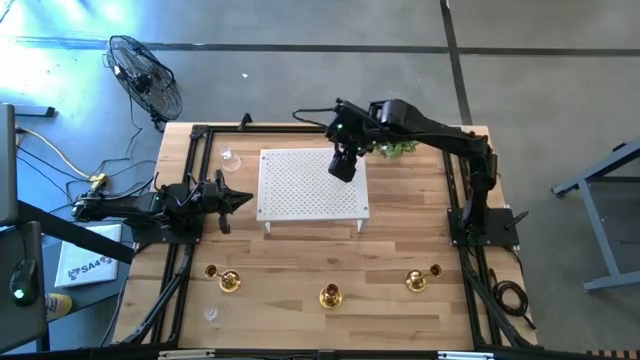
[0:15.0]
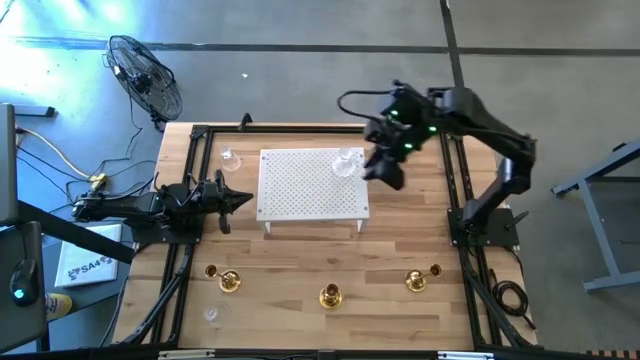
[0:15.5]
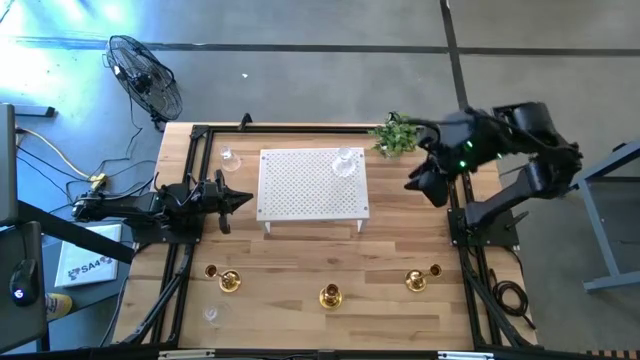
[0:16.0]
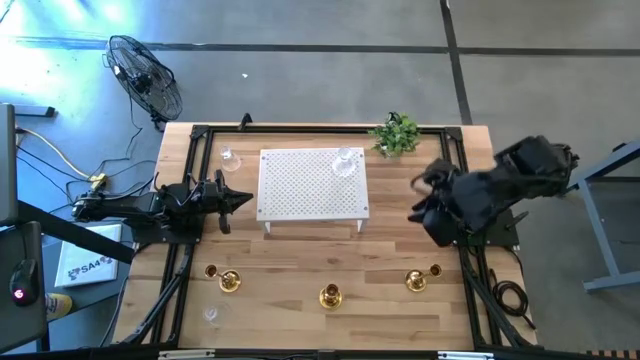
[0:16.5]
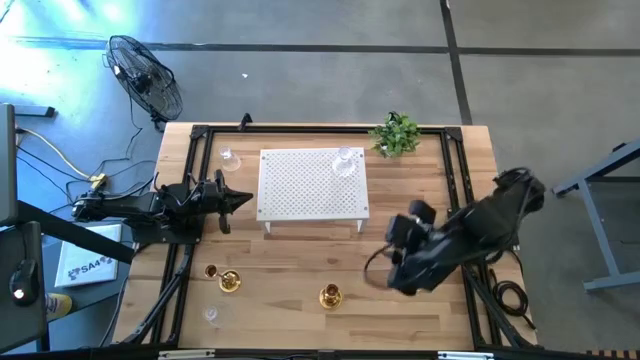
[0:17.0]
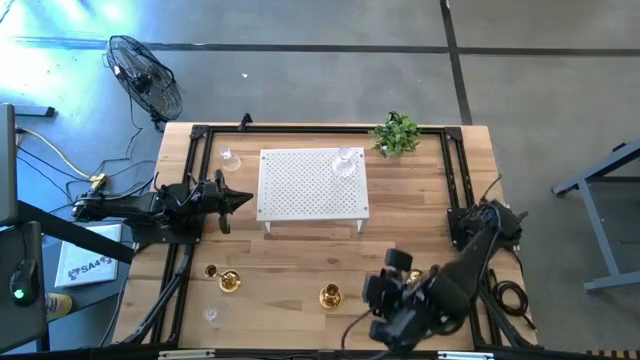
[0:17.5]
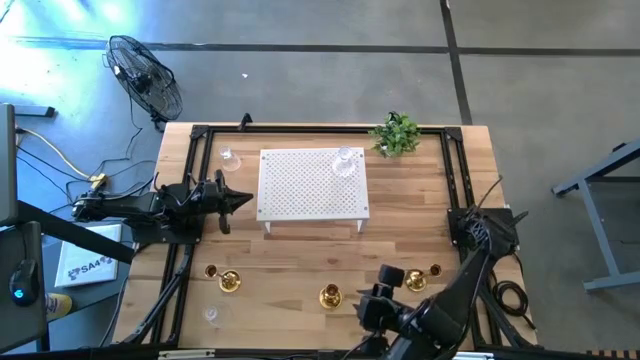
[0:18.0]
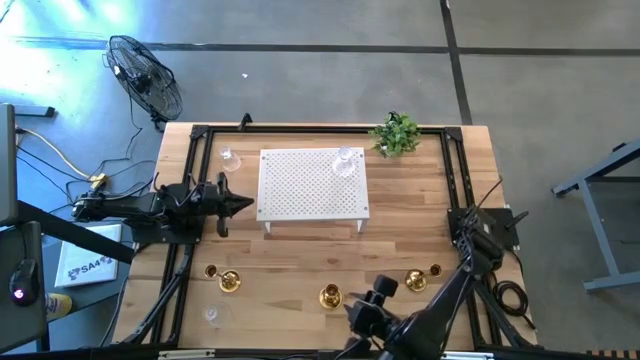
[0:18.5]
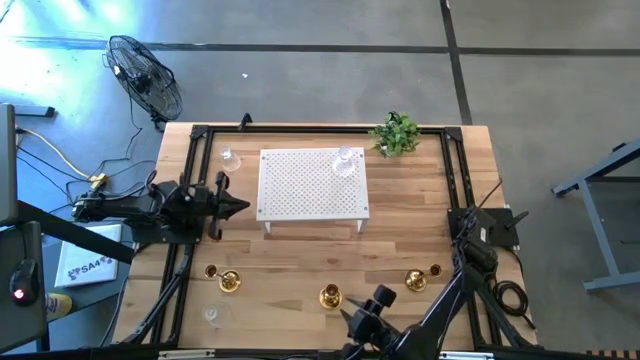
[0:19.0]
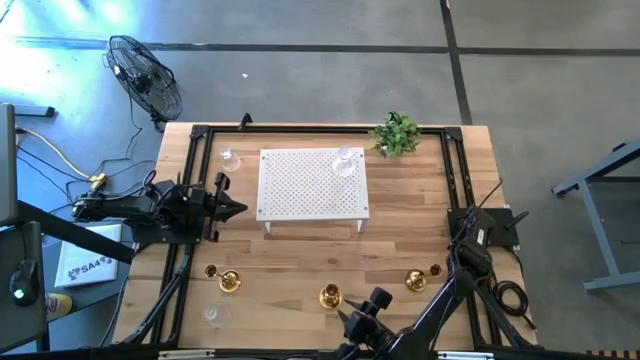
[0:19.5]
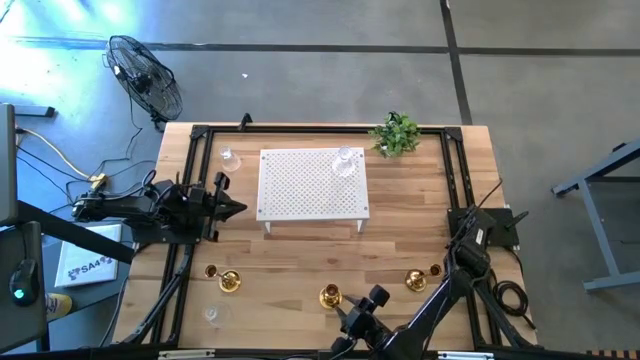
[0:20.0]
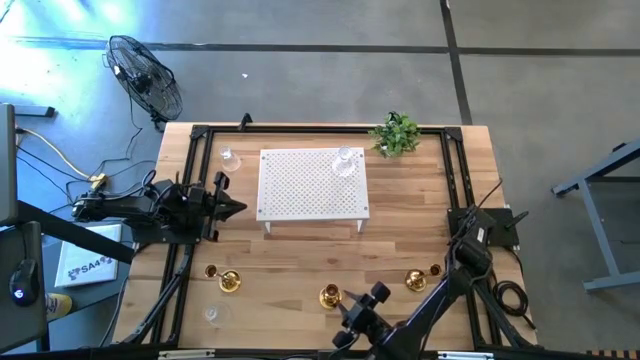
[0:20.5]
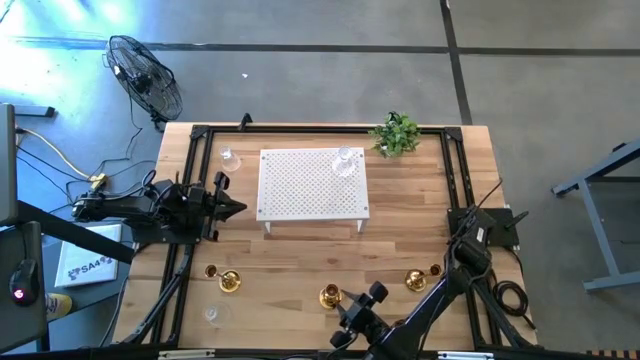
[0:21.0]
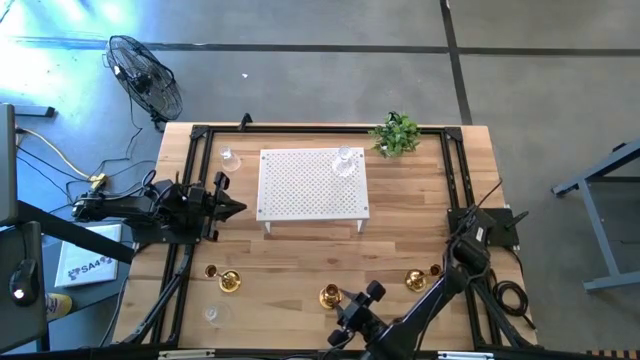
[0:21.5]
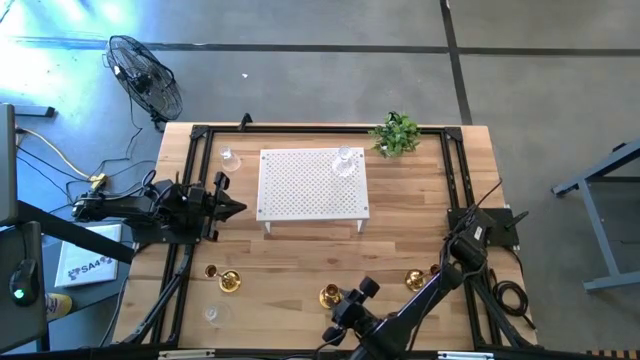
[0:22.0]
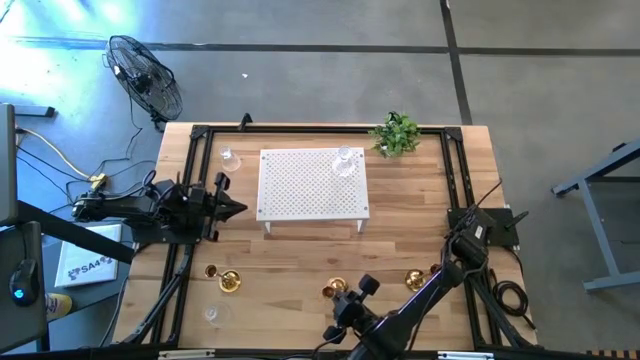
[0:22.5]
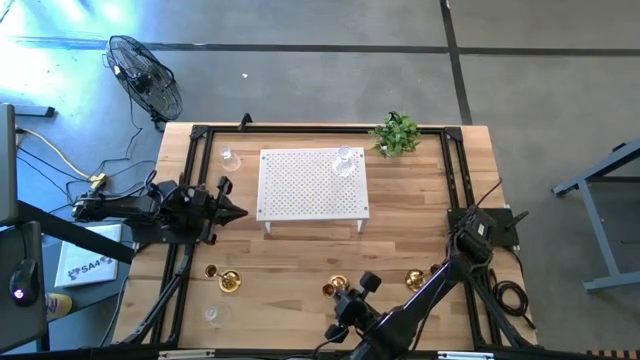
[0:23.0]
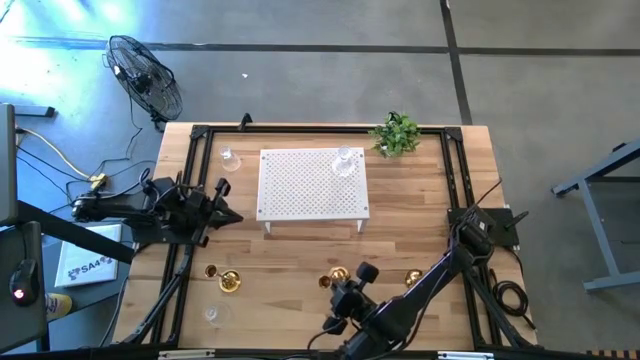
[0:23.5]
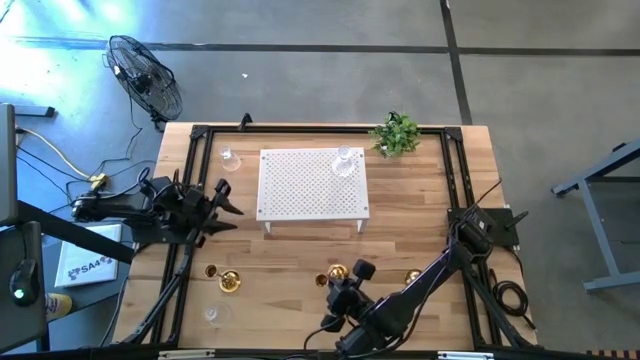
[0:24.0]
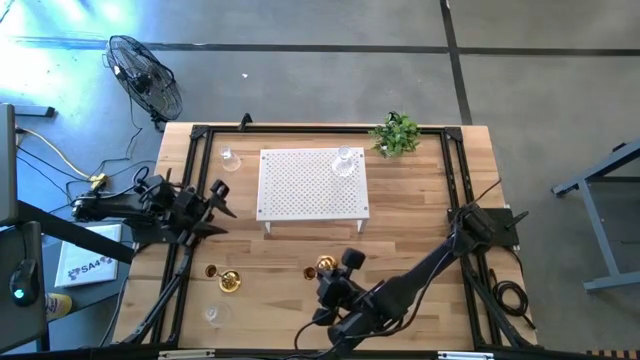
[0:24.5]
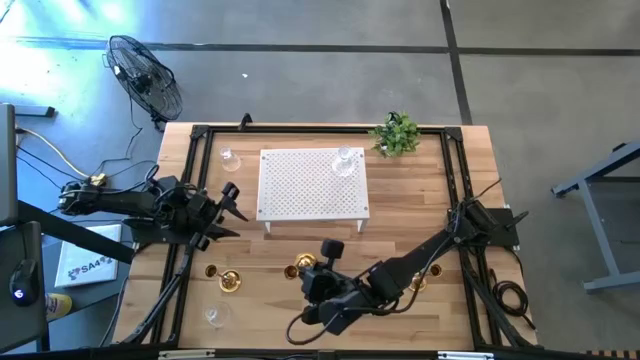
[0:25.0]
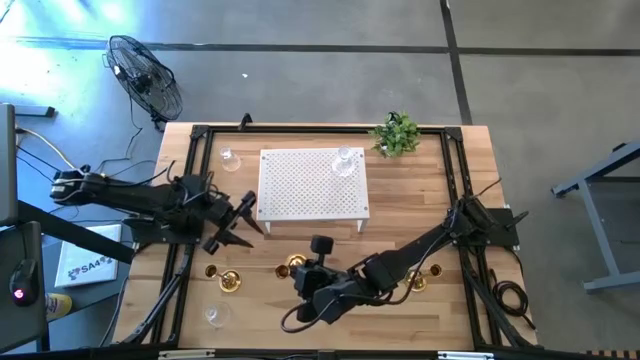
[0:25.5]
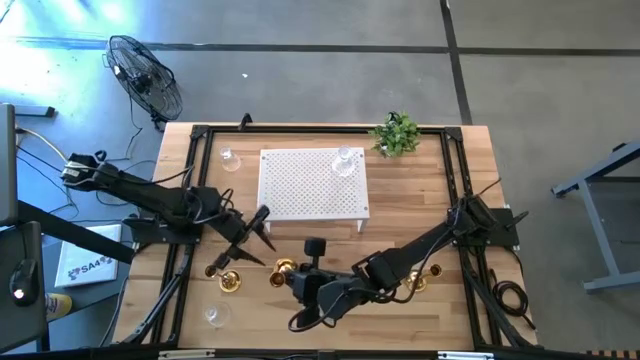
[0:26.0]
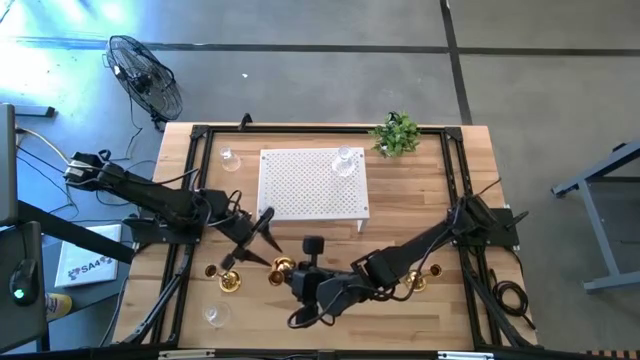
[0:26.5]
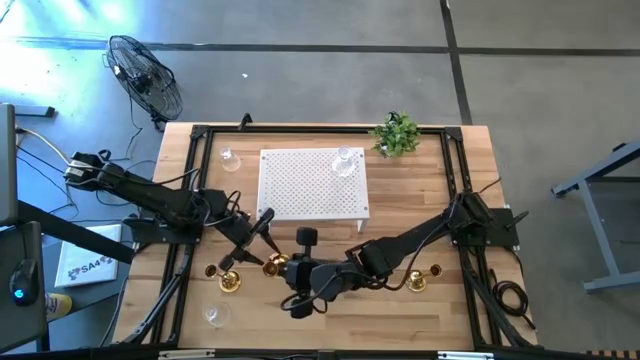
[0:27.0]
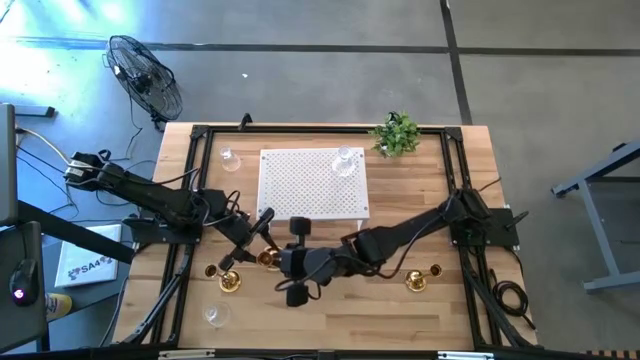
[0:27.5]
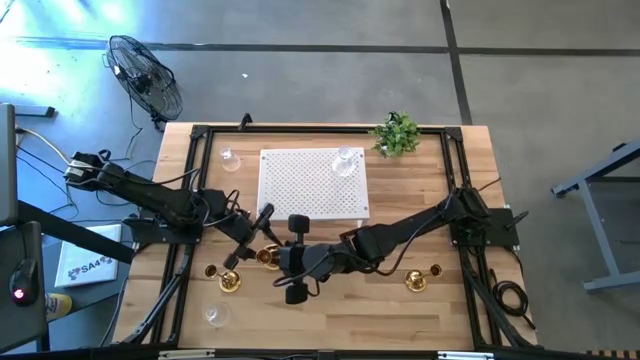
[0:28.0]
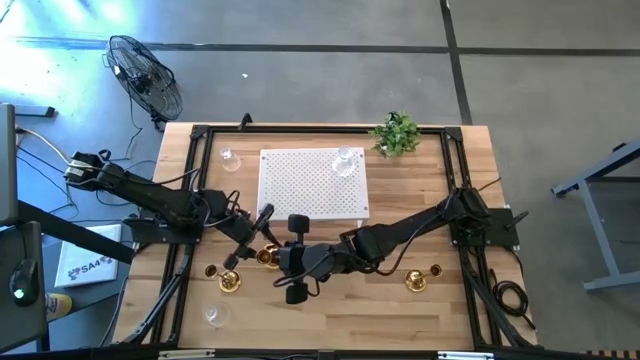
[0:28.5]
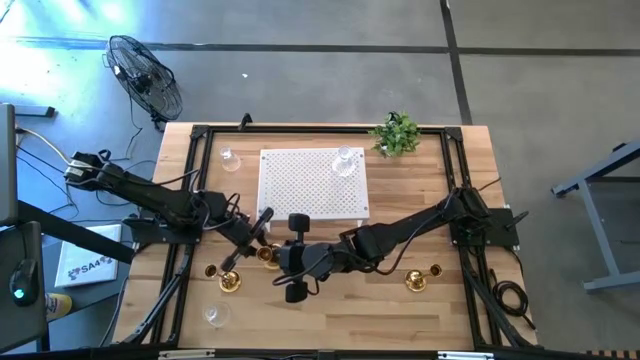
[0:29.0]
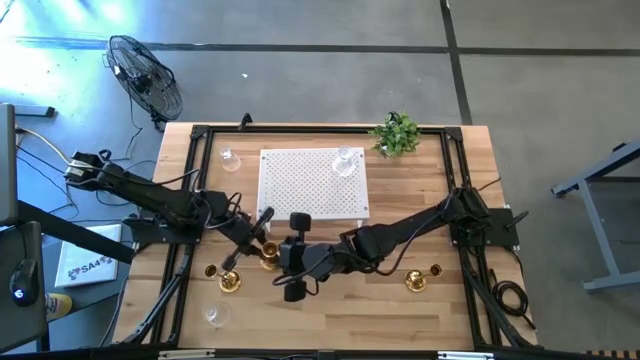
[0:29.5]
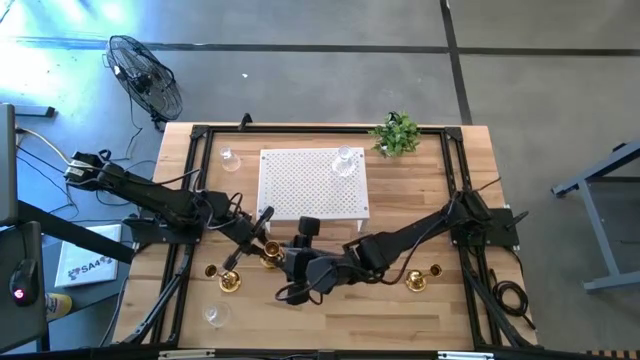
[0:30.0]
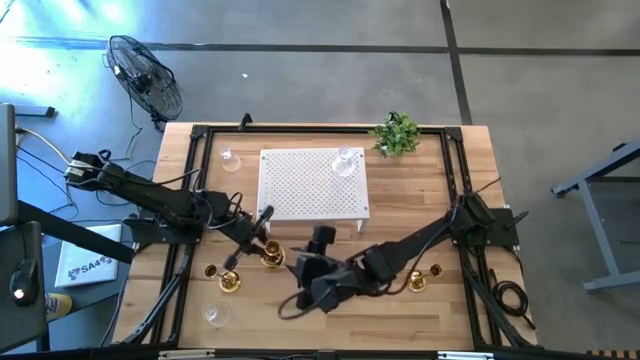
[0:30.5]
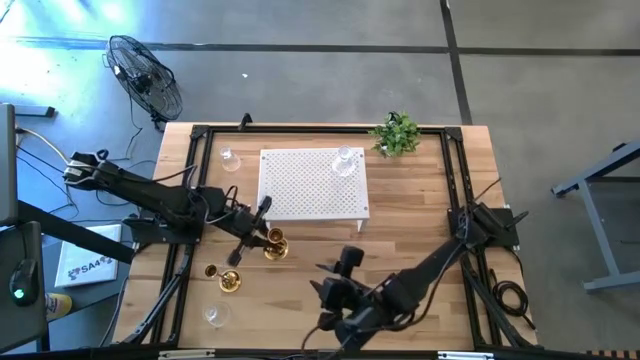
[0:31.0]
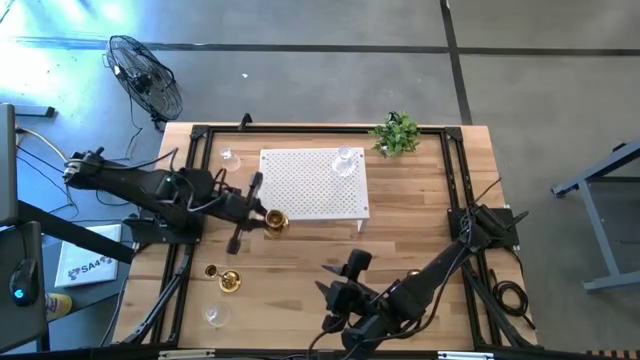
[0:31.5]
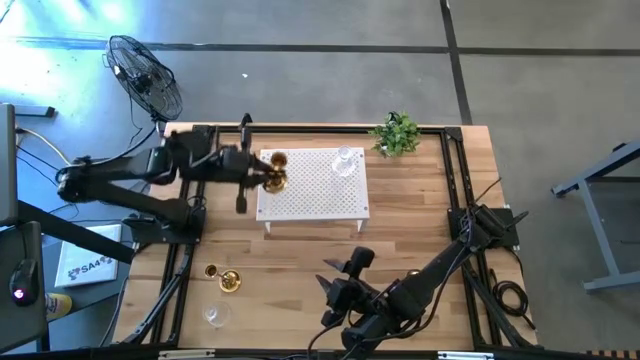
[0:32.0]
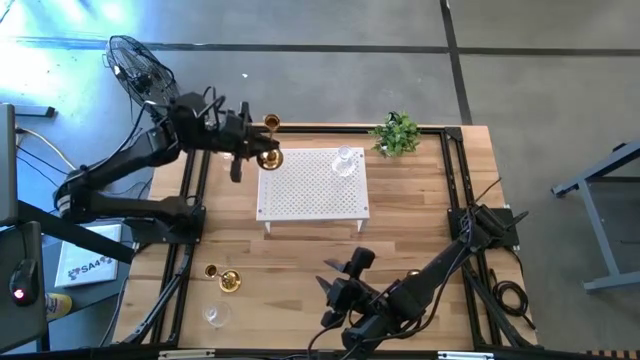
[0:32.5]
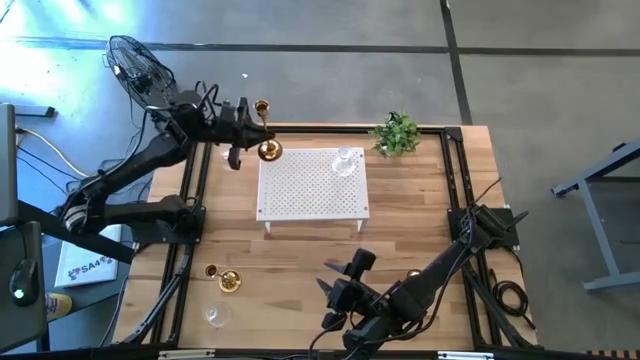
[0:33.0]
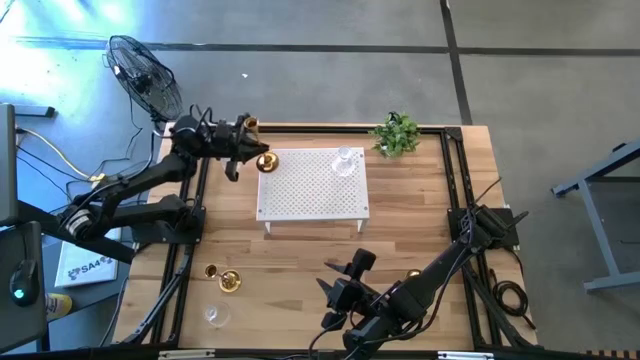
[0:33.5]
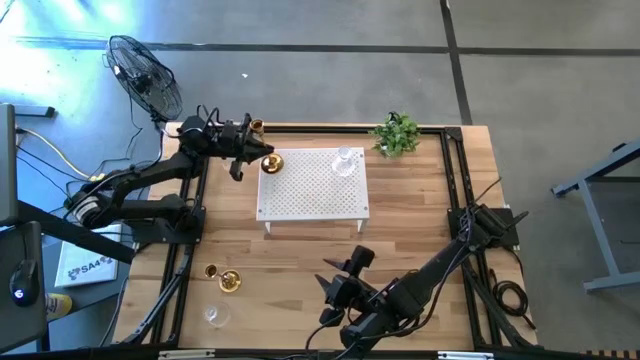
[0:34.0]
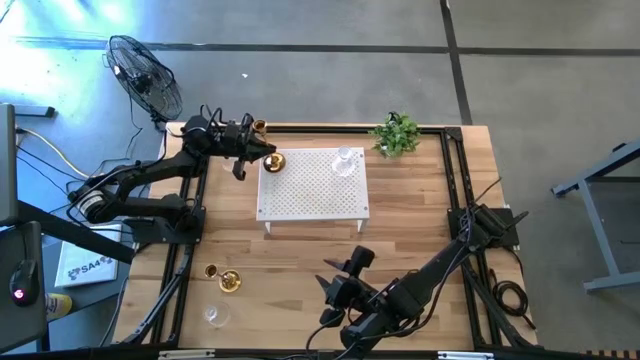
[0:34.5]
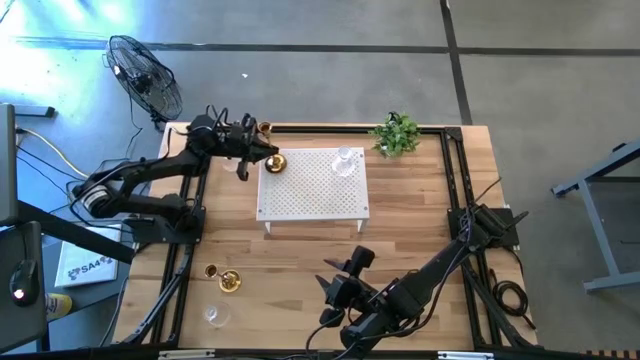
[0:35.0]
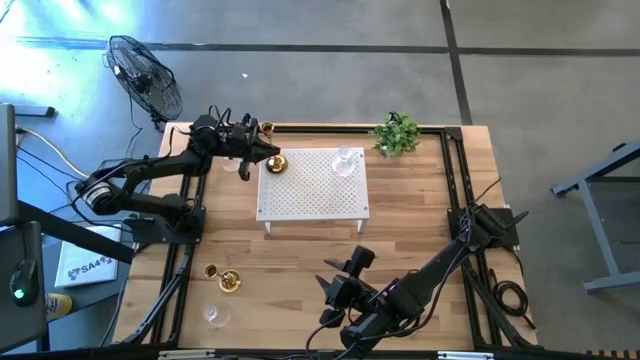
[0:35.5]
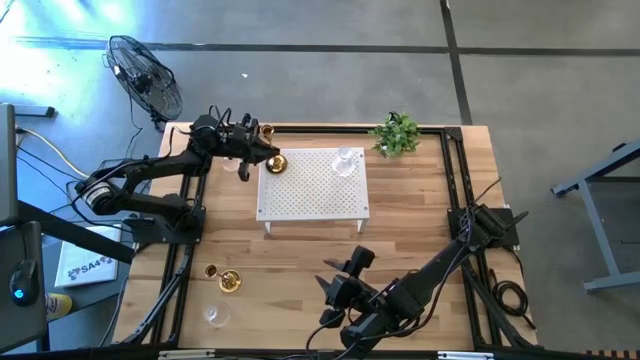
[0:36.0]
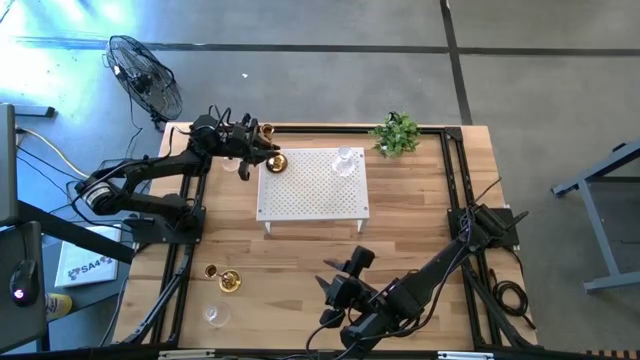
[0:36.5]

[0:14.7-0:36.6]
Task: Pick & Place candle stick holders
Put the middle gold candle holder on the shelf
